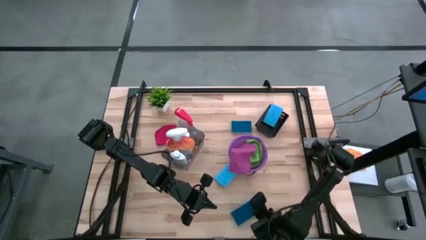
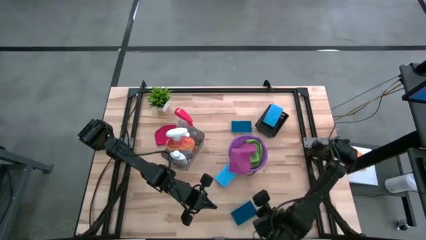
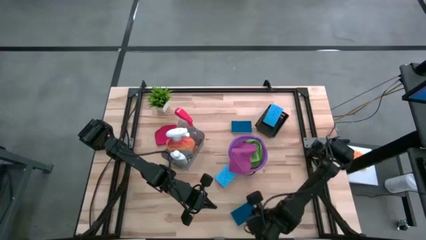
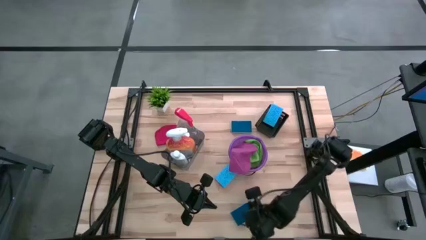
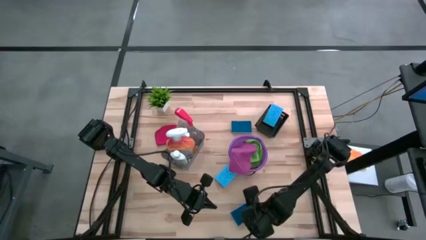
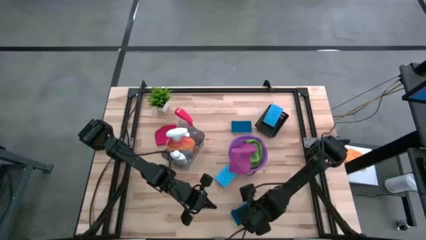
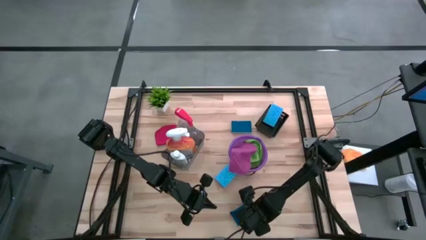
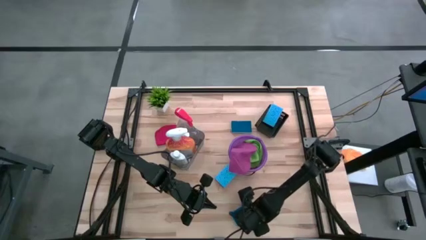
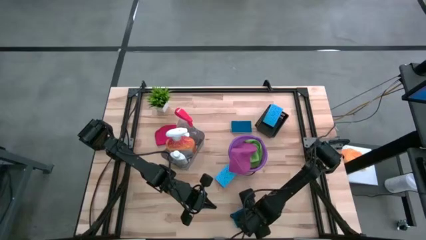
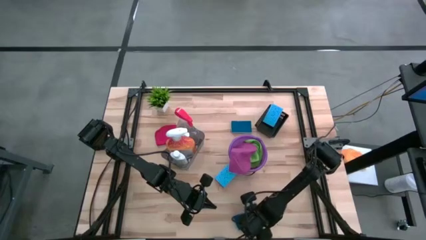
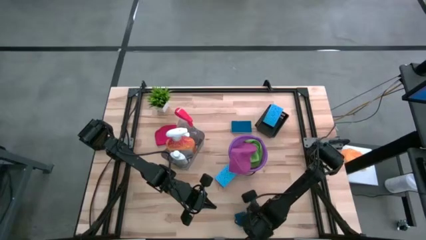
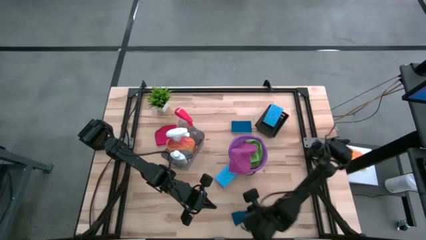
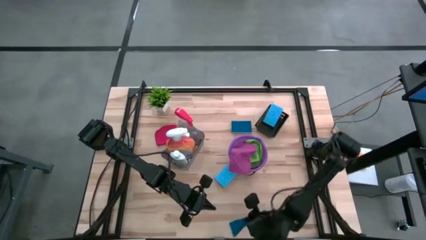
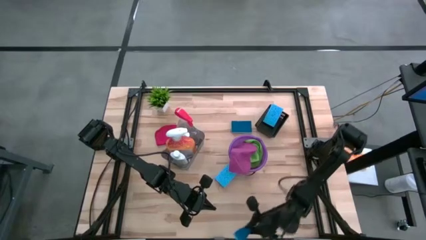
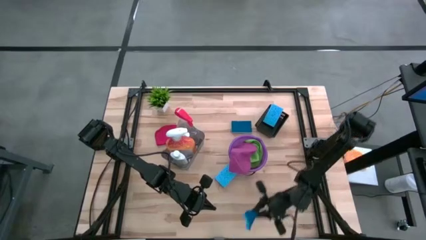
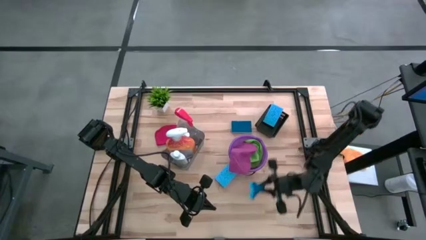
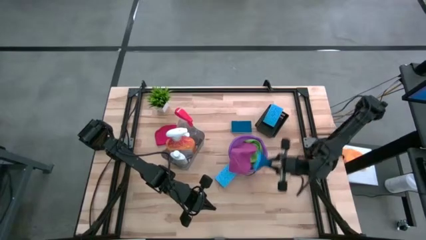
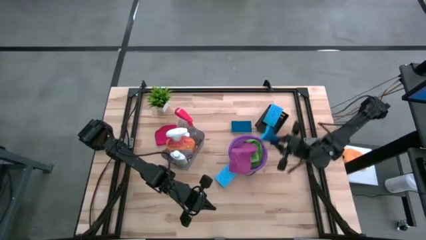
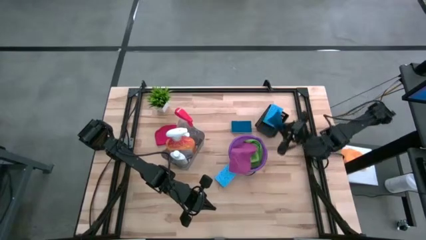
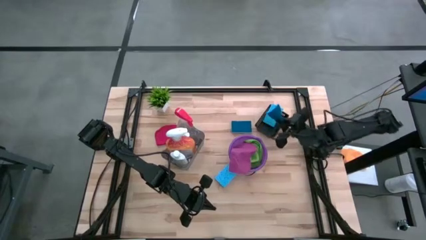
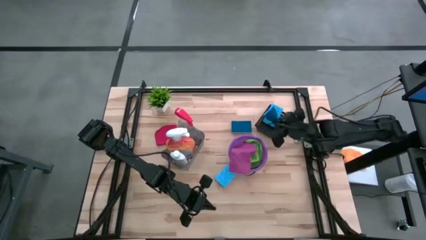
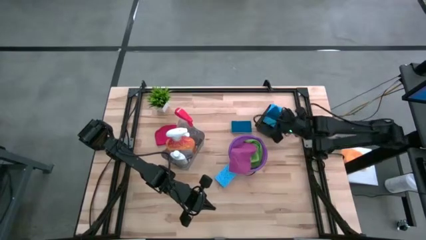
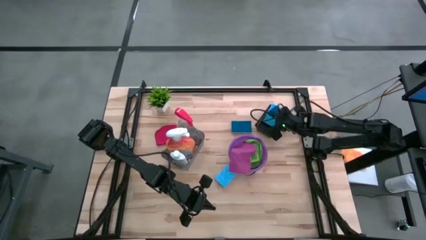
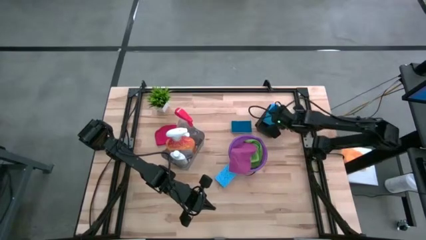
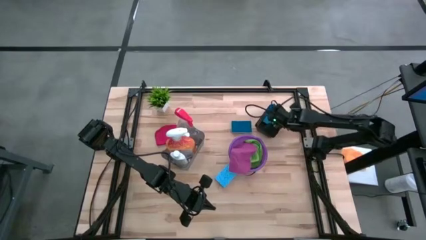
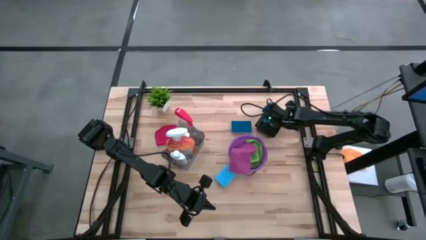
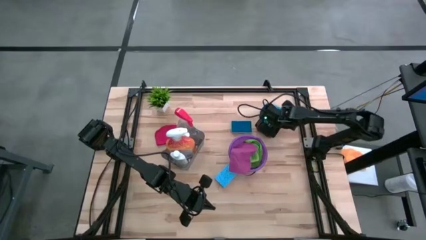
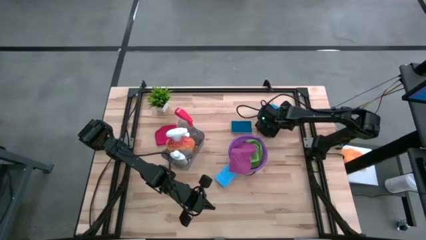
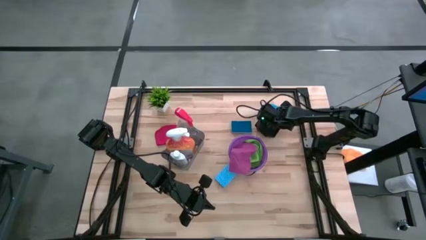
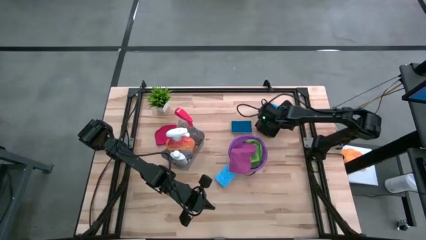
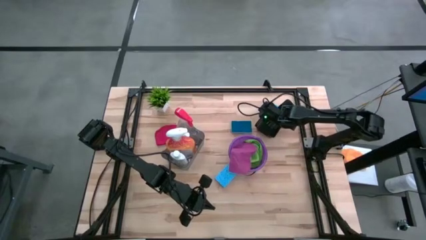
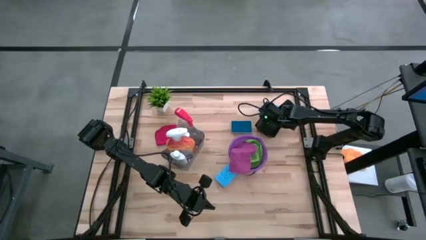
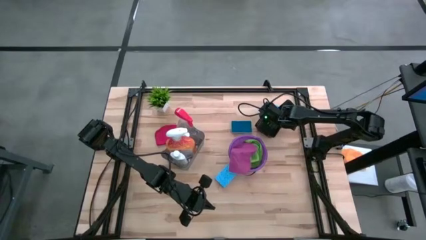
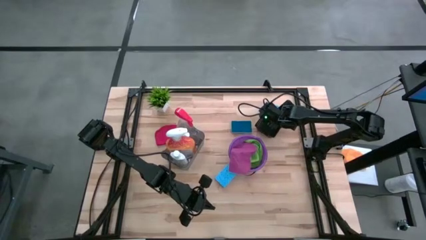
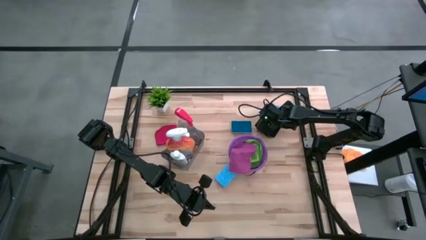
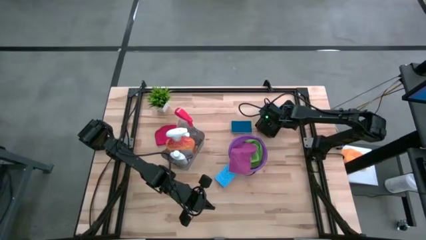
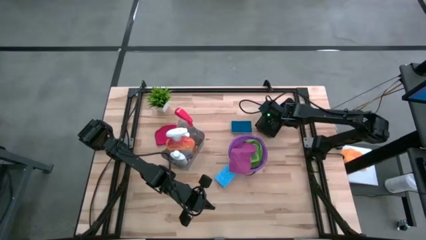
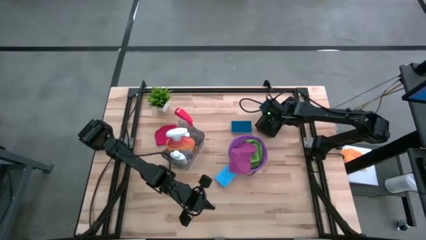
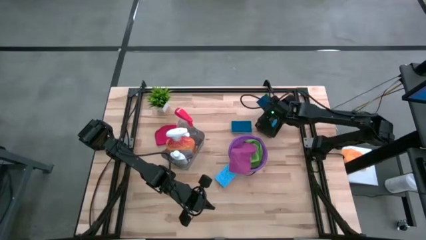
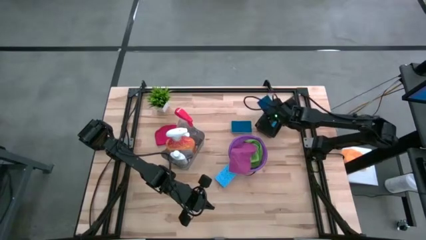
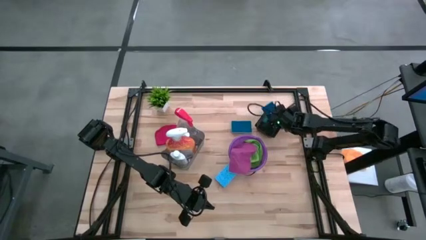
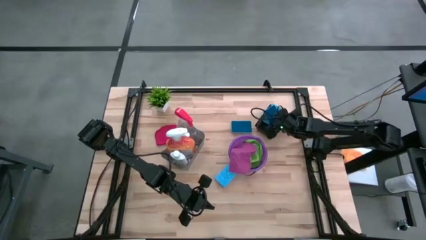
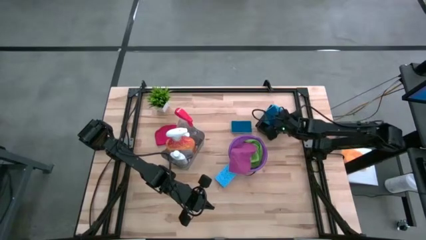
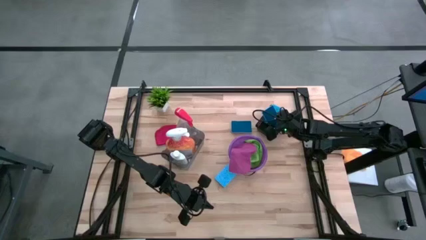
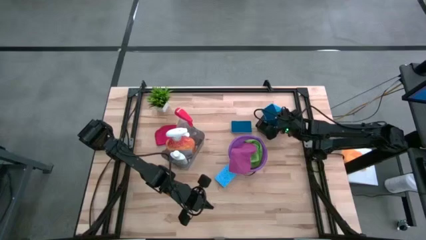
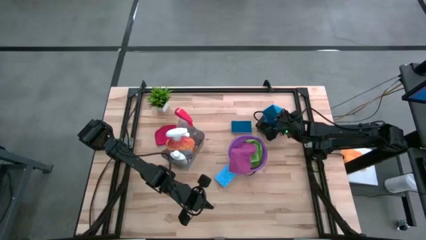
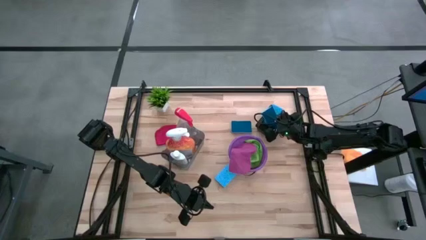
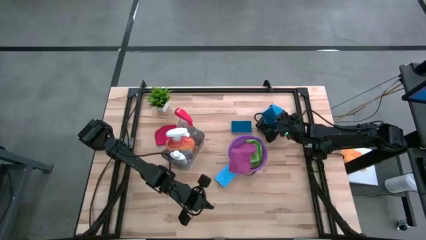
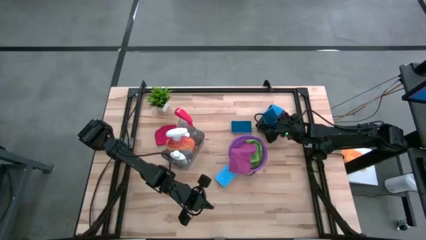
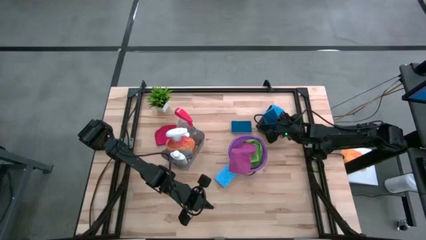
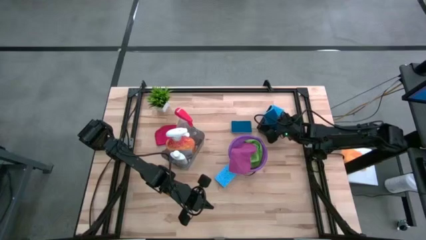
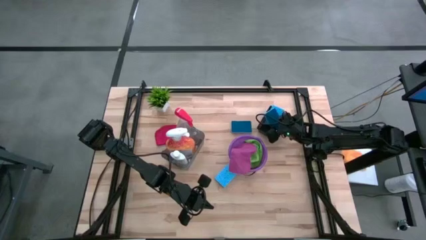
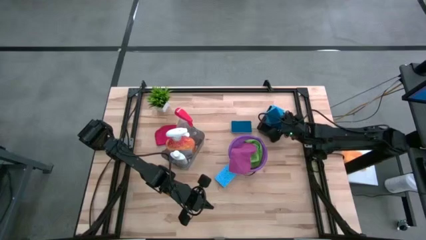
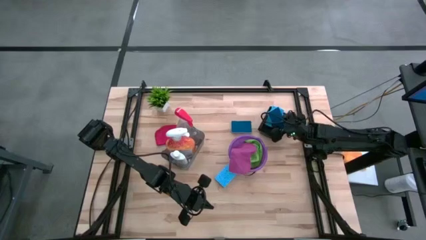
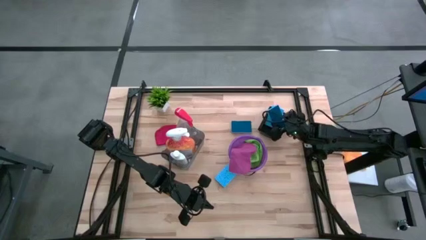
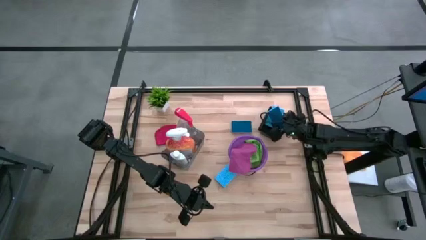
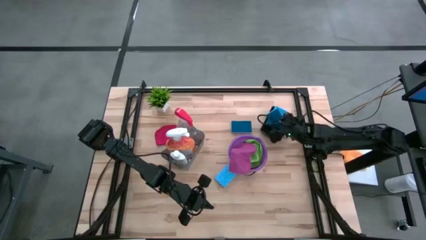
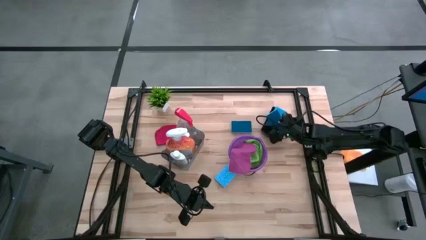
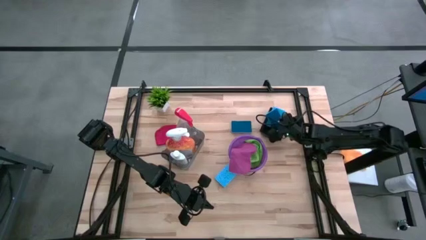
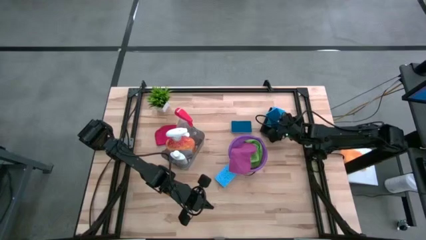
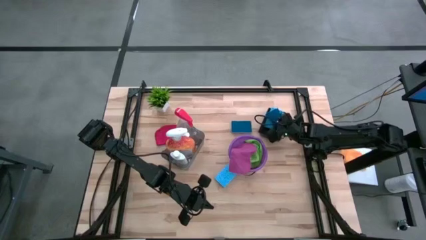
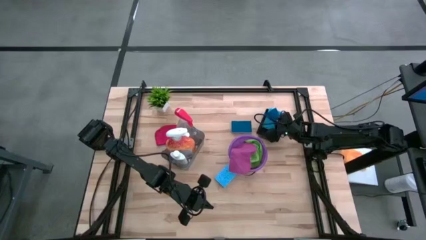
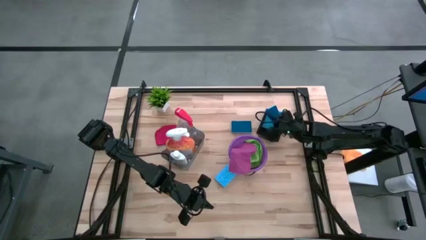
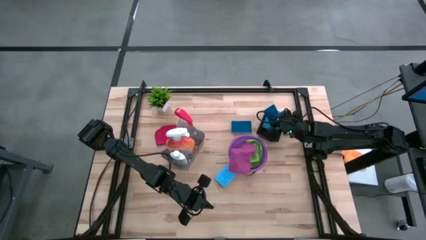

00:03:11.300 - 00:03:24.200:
Task: Pick & Place Kitchen Items
Put the blue sponge wipe into the black bin

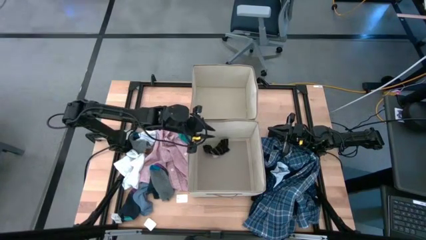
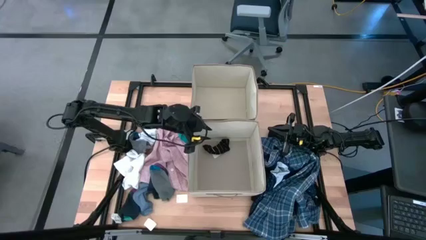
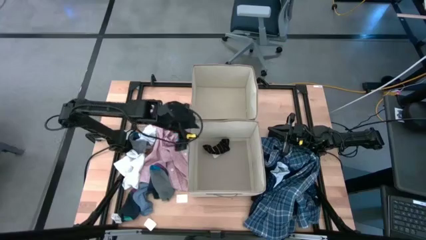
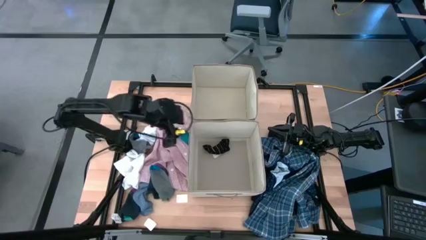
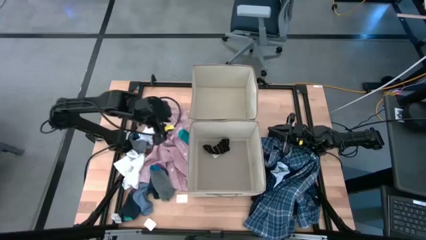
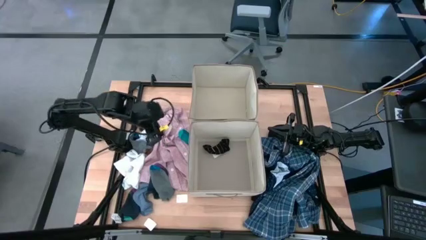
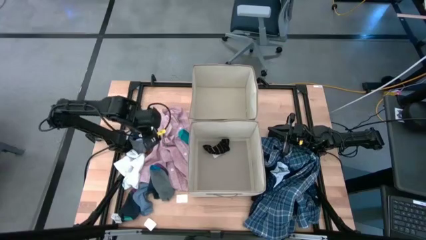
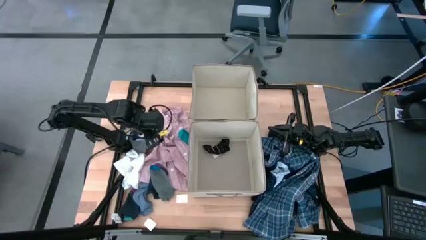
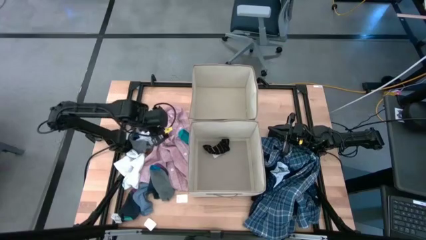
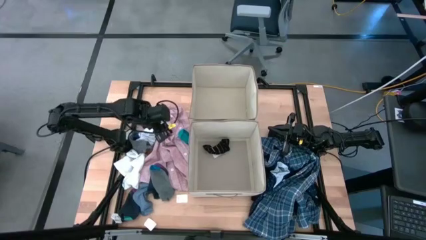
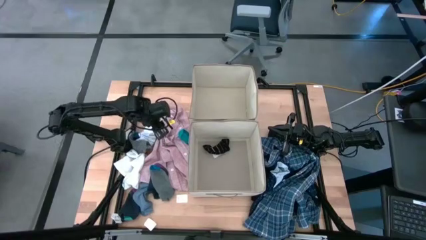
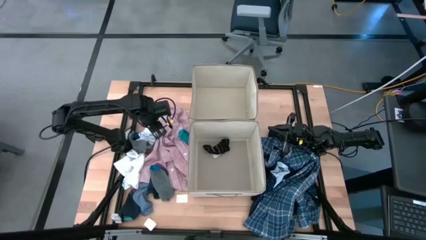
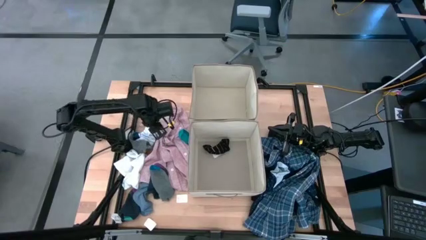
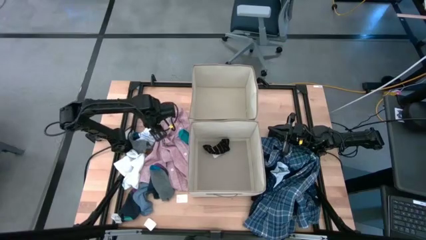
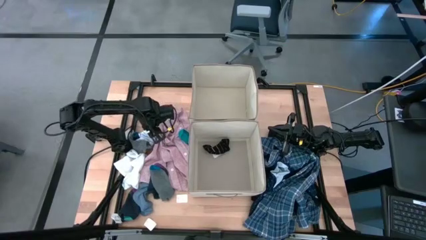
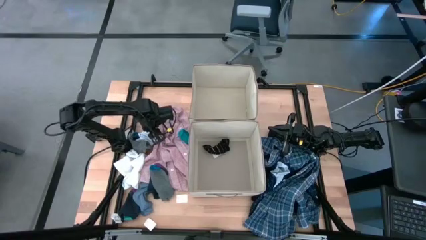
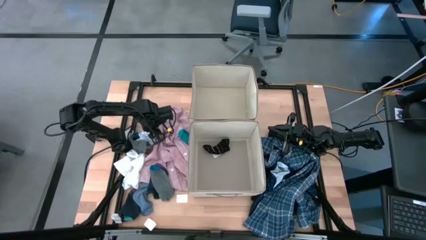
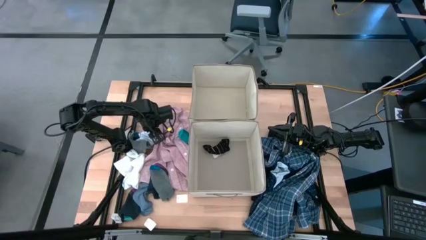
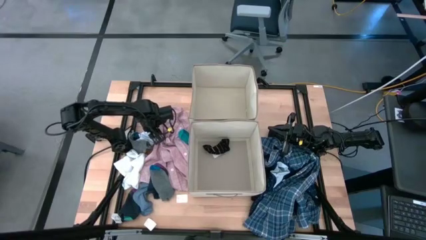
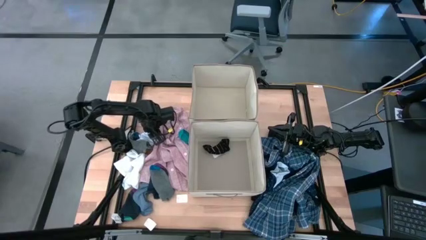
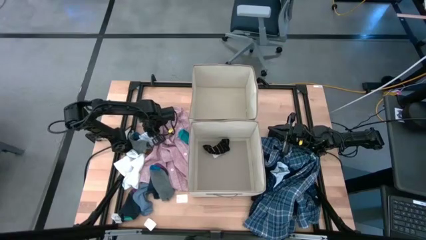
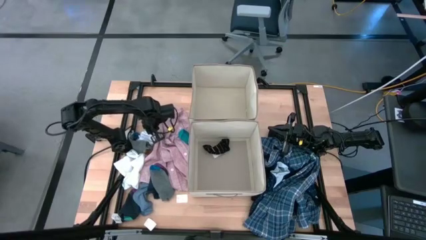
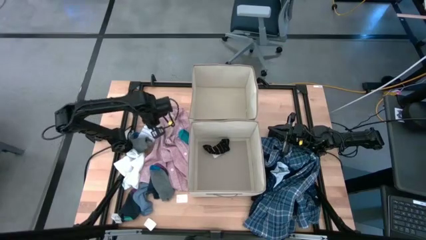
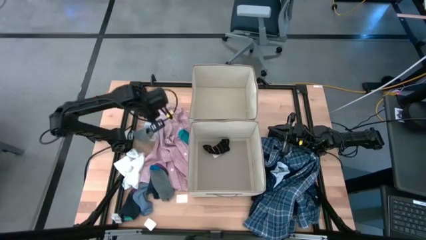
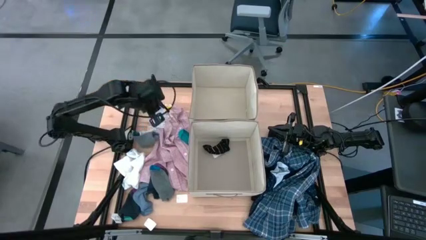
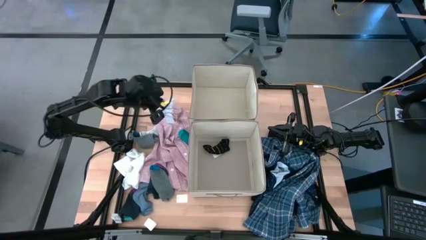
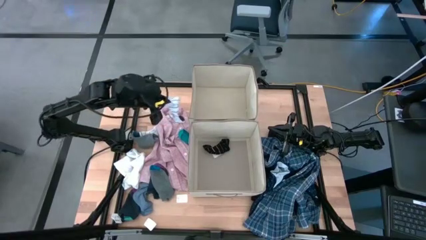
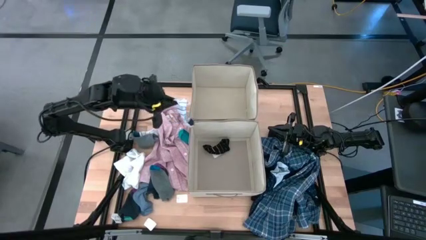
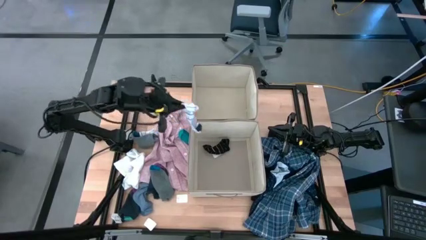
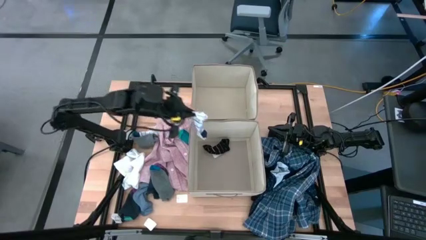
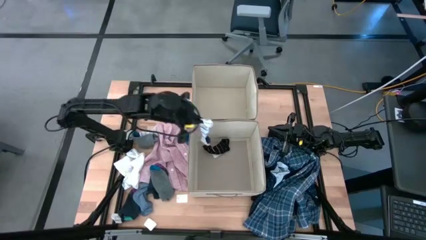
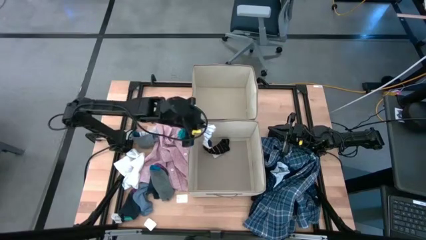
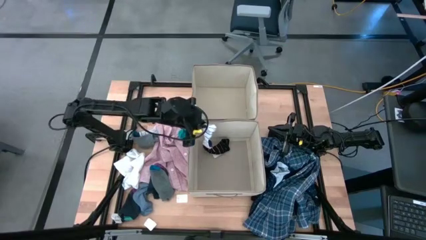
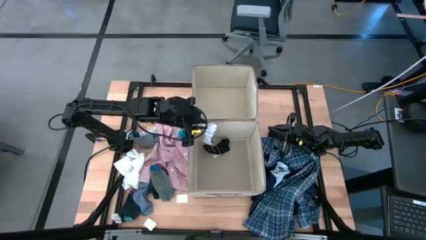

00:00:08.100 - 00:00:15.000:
Task: Sort clothes
Put the white patterned sock into the bottom laundry organizer
